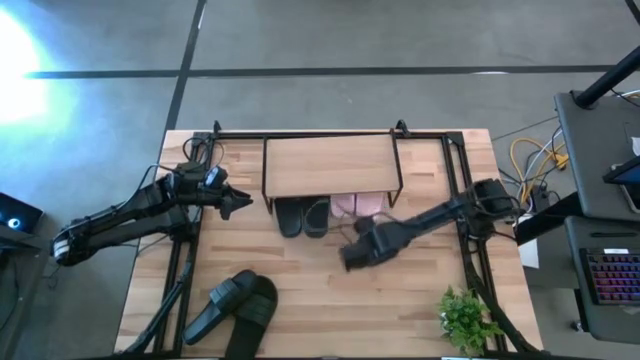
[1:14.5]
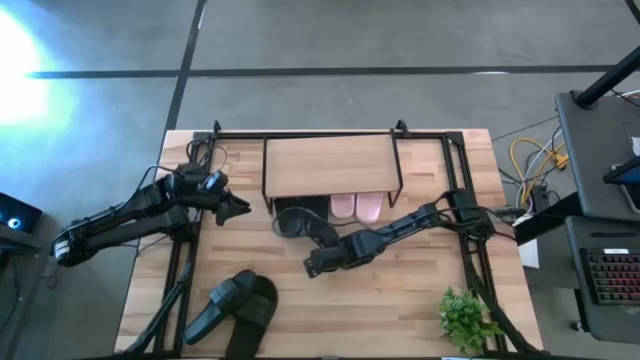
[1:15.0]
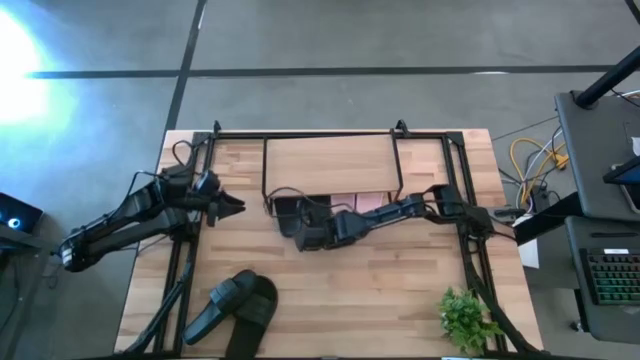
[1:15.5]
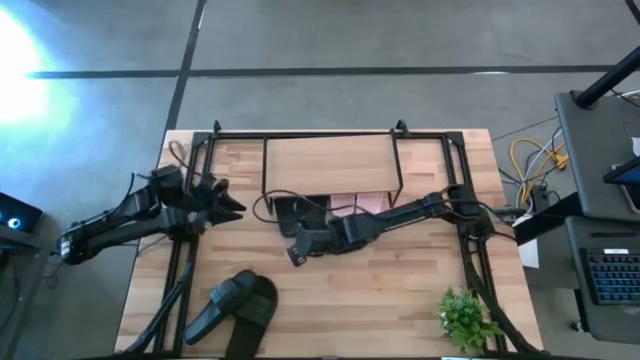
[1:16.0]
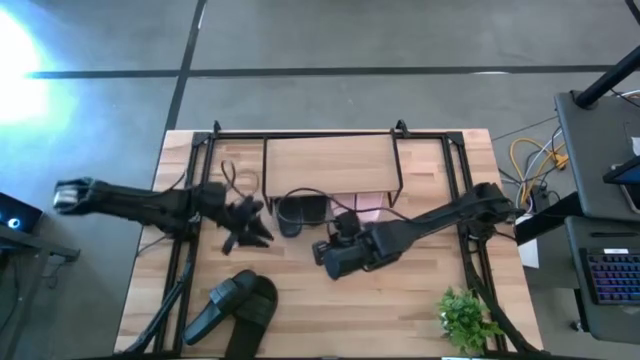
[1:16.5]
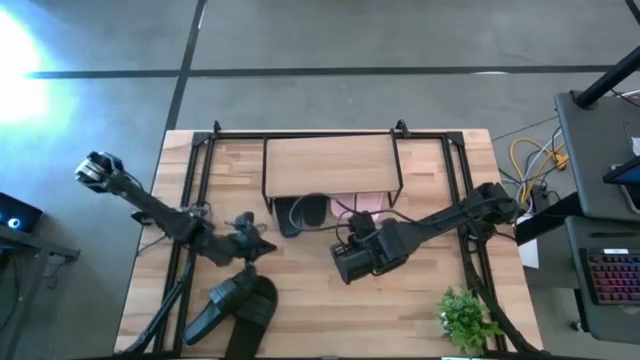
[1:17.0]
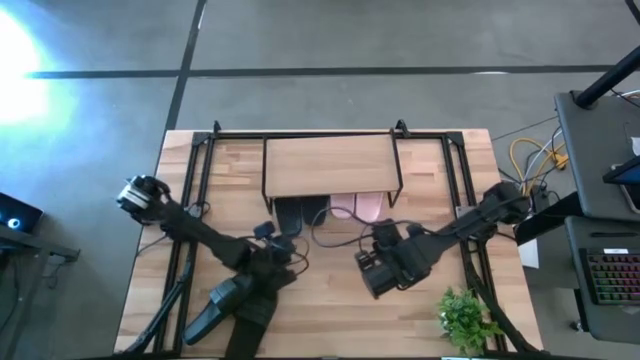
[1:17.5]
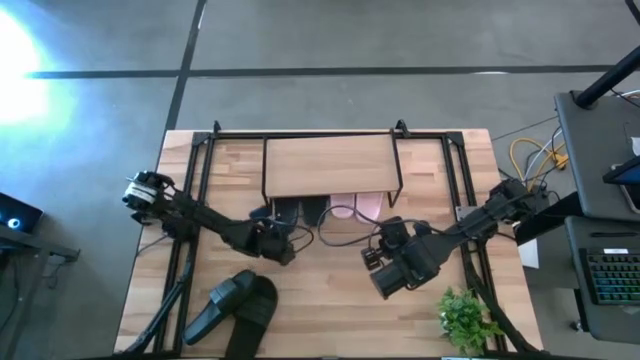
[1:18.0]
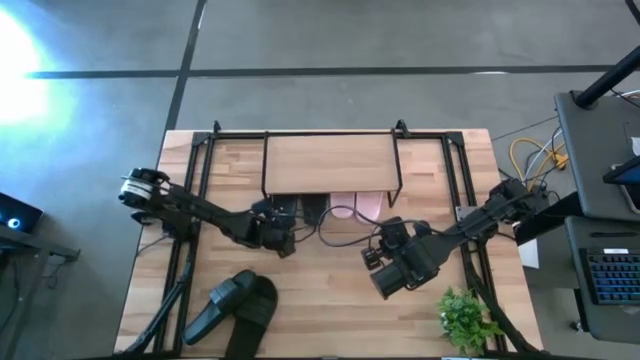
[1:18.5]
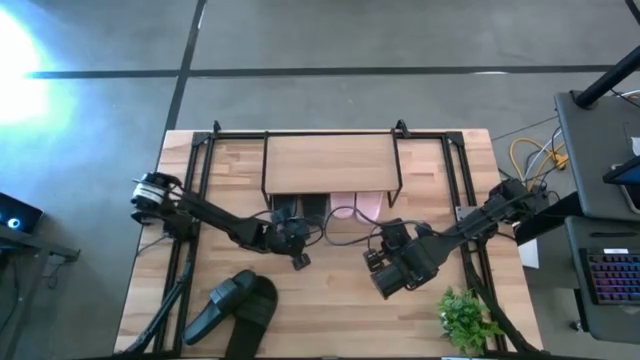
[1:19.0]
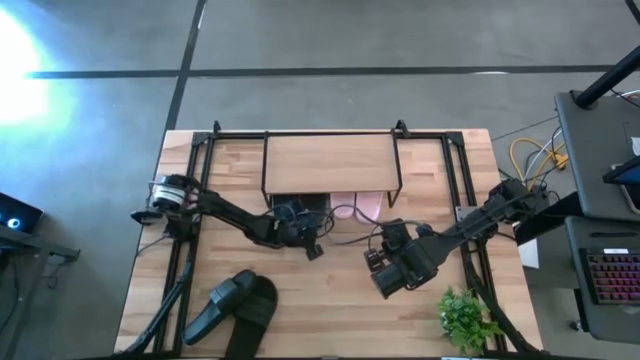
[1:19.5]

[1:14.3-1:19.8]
Task: Pick and place slides into the shelf
Adjust the black slides under the shelf

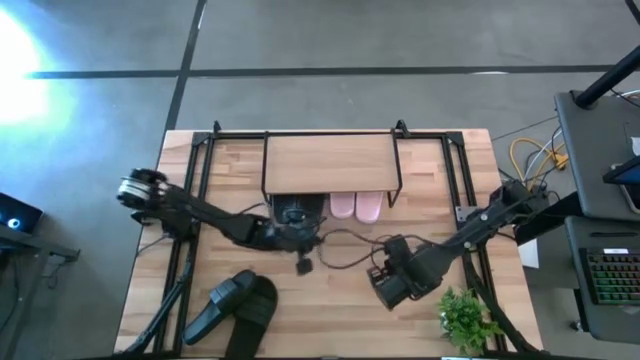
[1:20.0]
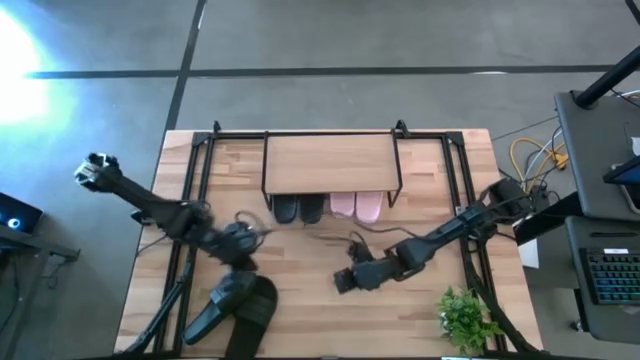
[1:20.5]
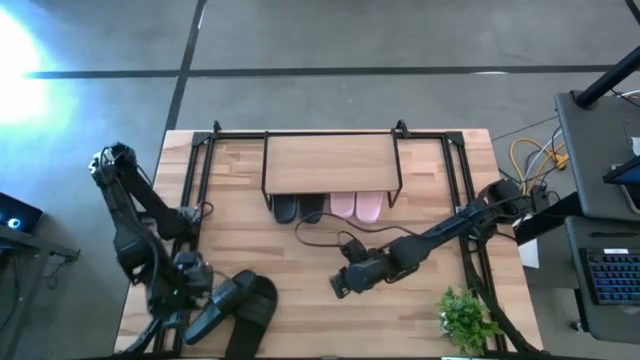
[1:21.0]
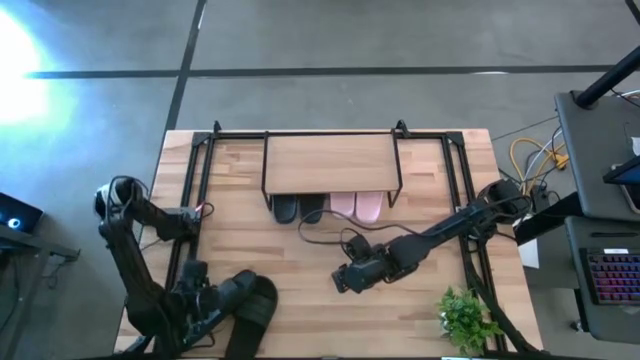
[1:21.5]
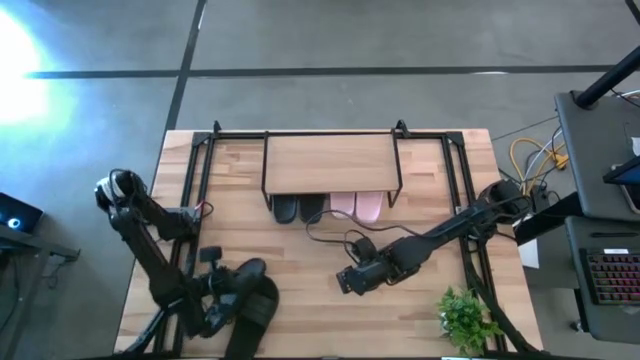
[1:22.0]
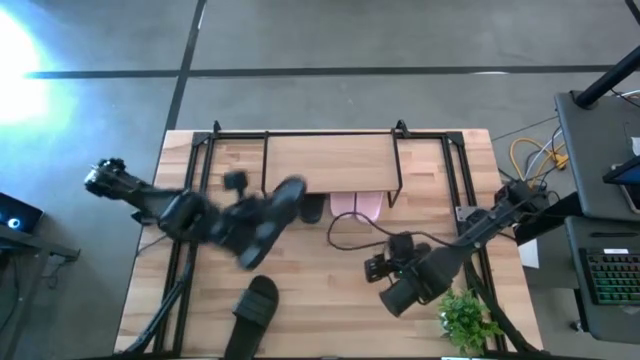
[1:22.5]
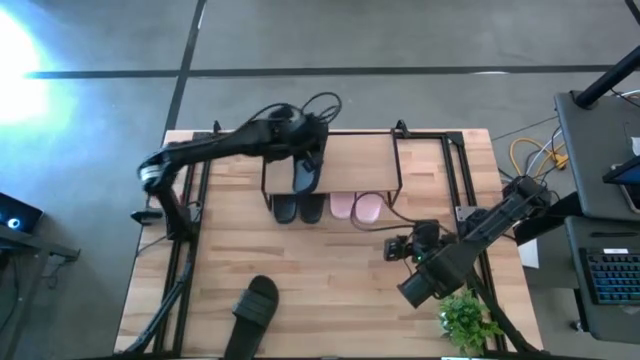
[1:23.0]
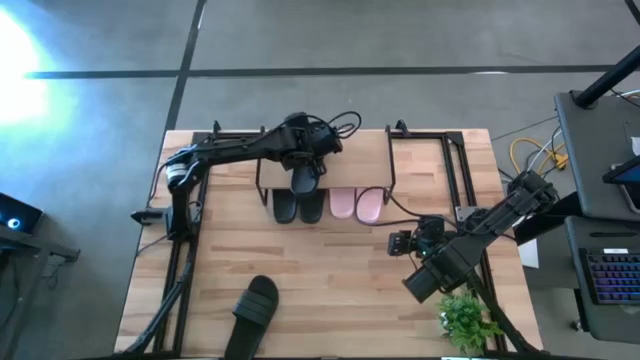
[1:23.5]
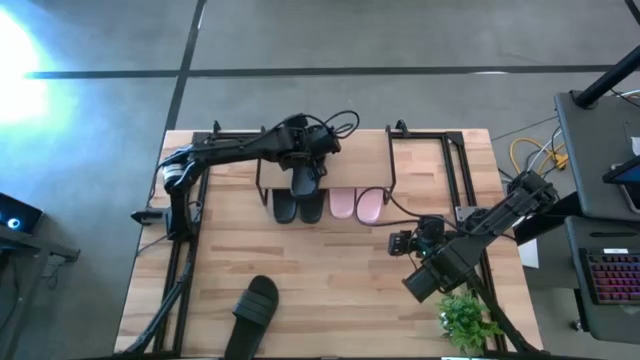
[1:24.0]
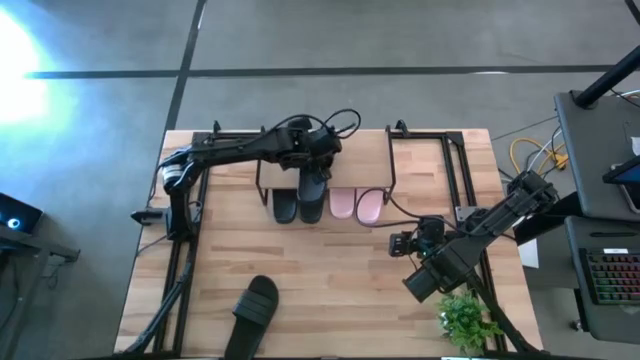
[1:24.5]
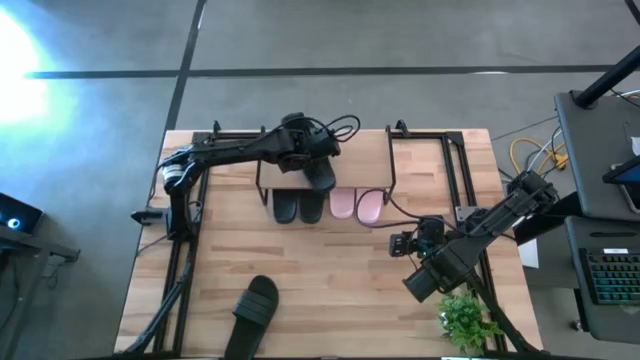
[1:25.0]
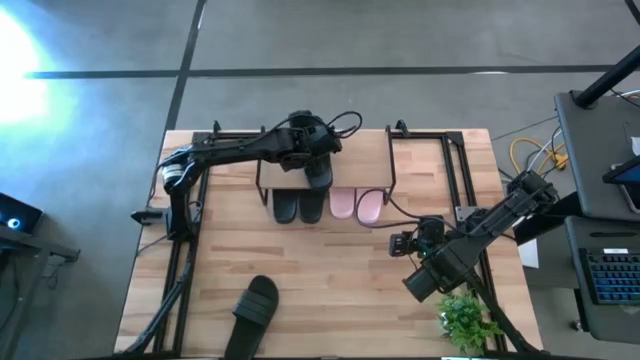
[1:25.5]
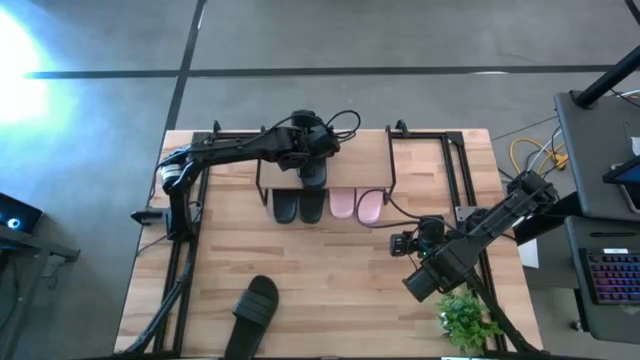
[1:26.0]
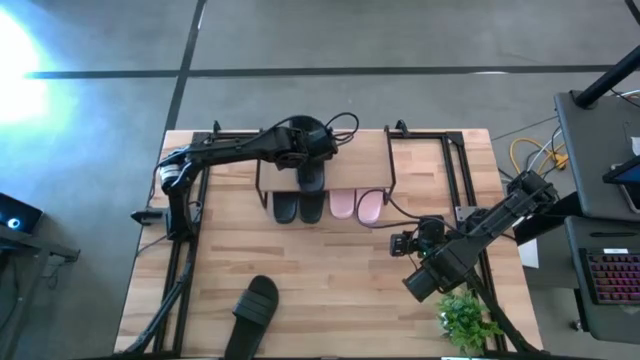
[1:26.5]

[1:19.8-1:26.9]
Put the black slides on the shelf

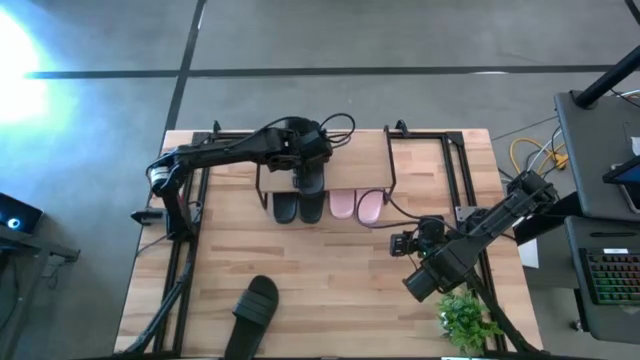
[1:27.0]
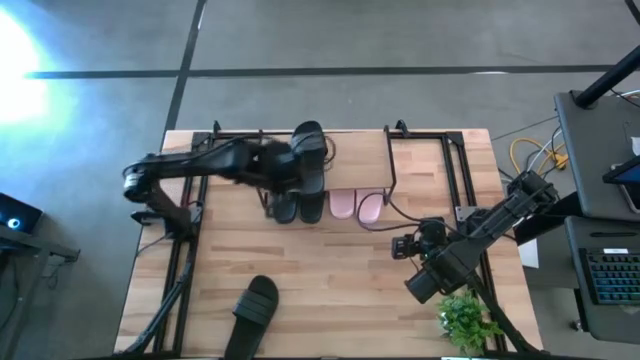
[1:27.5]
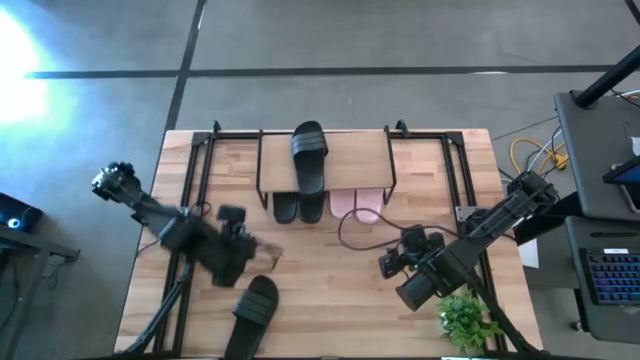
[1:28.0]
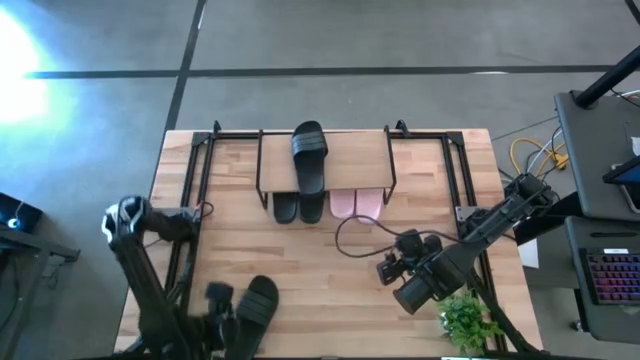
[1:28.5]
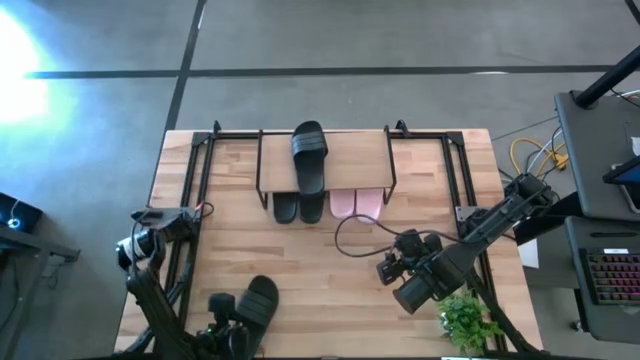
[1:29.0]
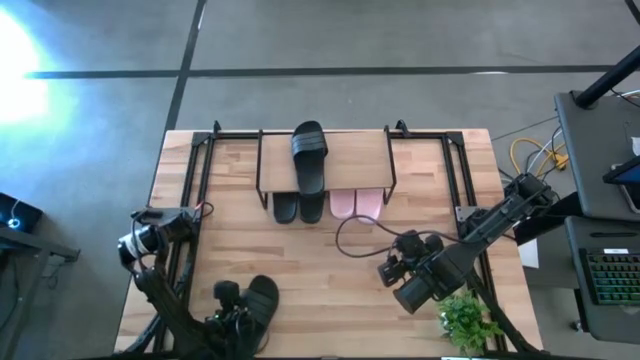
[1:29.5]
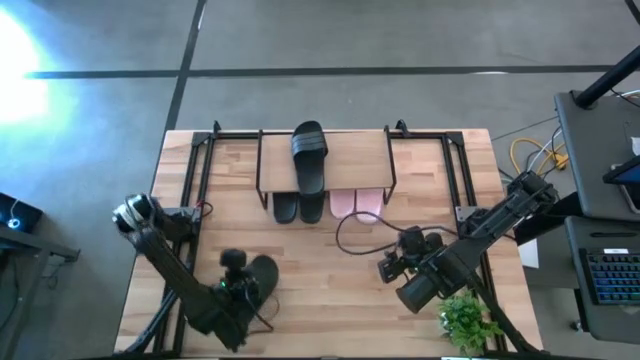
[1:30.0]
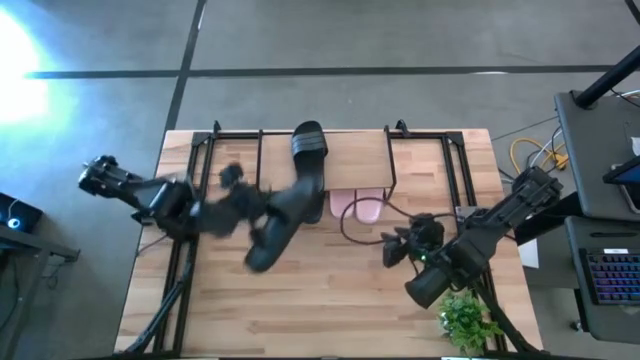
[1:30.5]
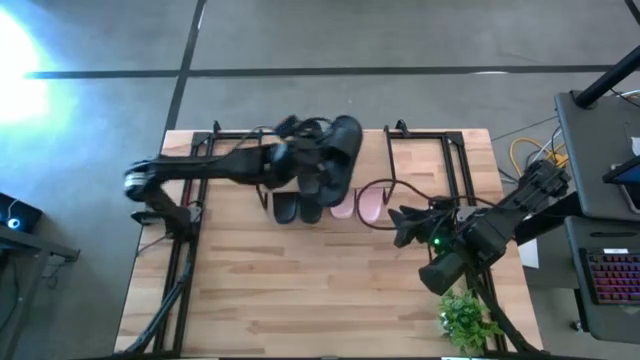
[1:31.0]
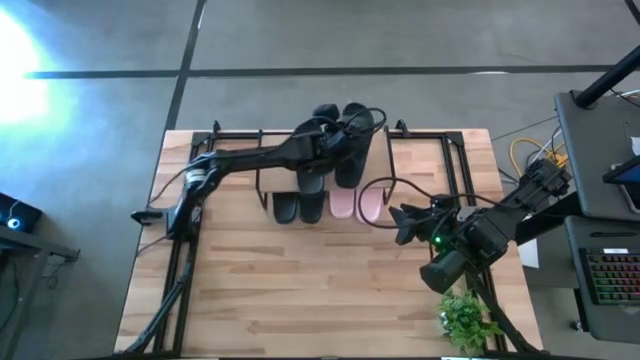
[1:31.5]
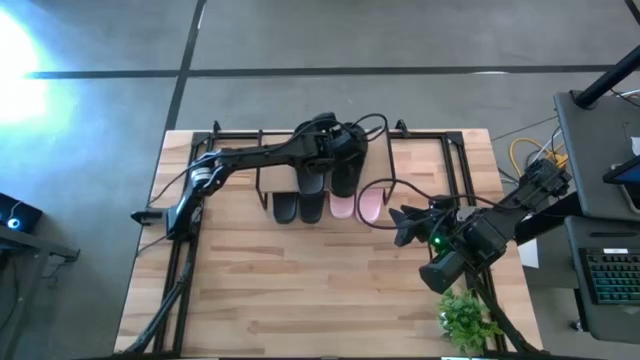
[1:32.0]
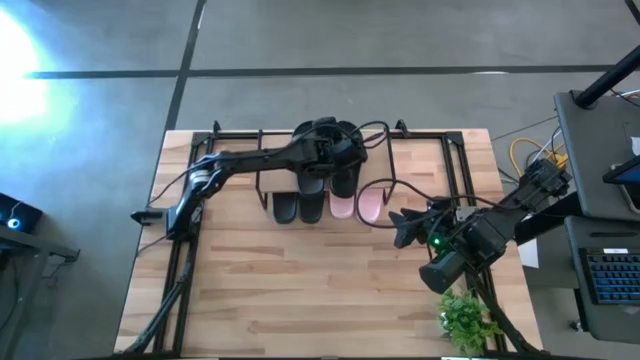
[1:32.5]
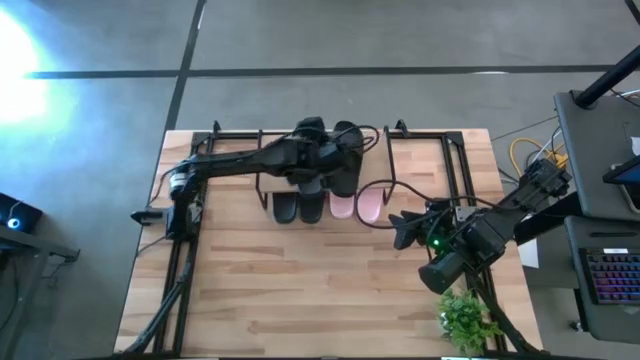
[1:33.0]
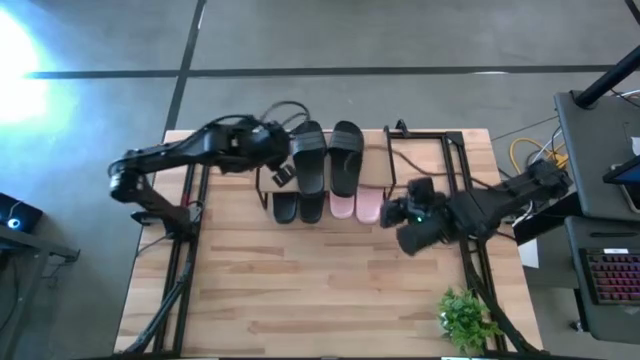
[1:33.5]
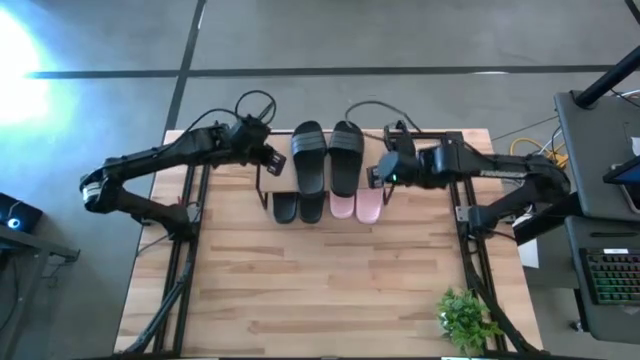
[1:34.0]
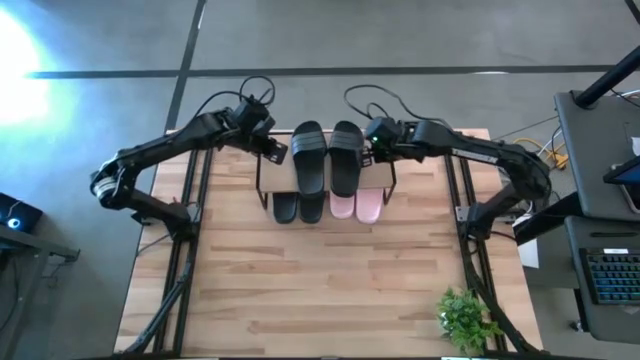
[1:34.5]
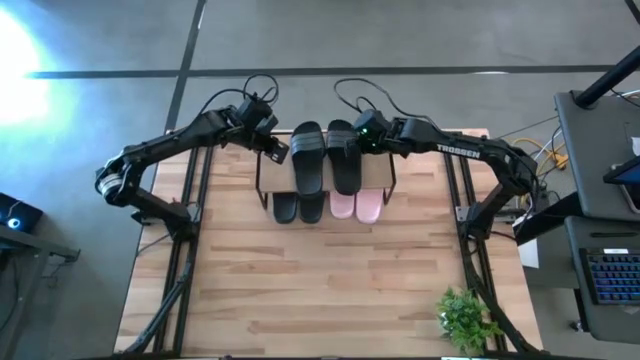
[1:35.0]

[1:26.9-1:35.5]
Put the pair of black slides on the shelf
